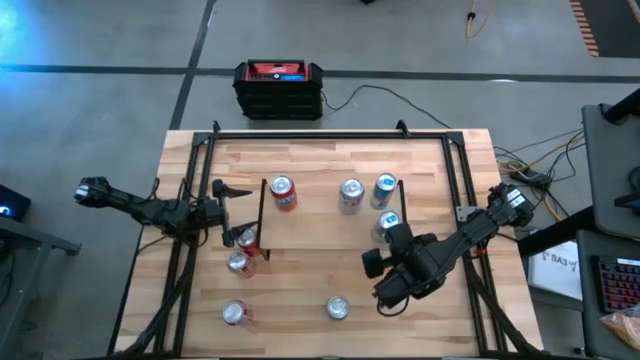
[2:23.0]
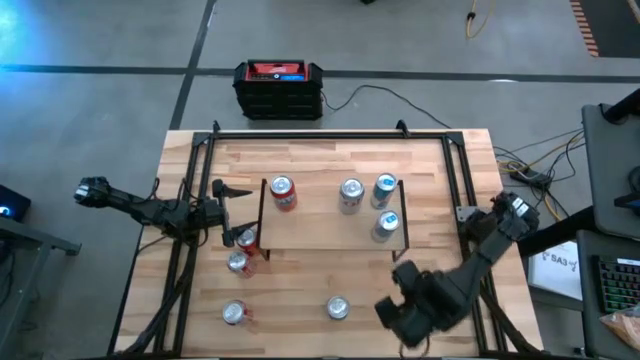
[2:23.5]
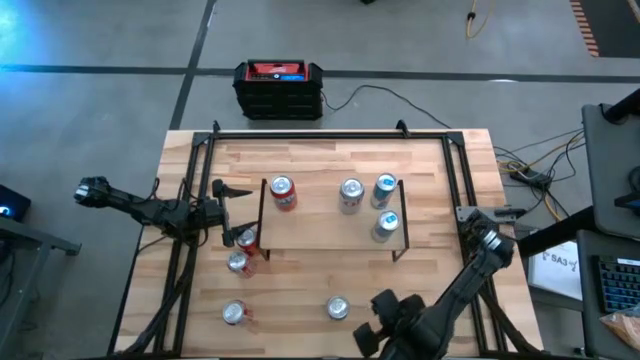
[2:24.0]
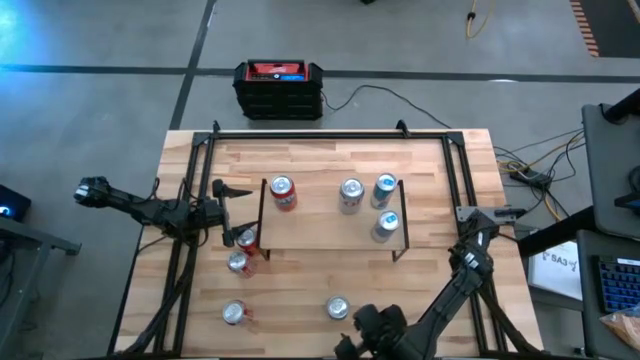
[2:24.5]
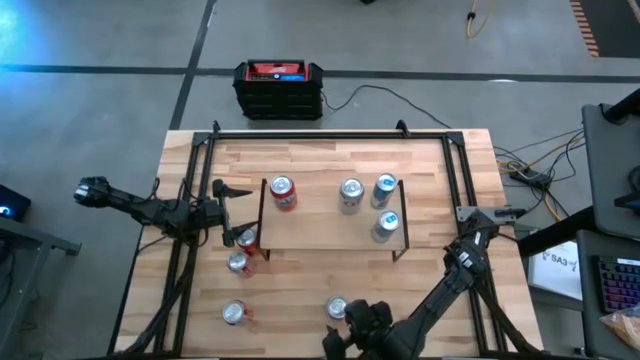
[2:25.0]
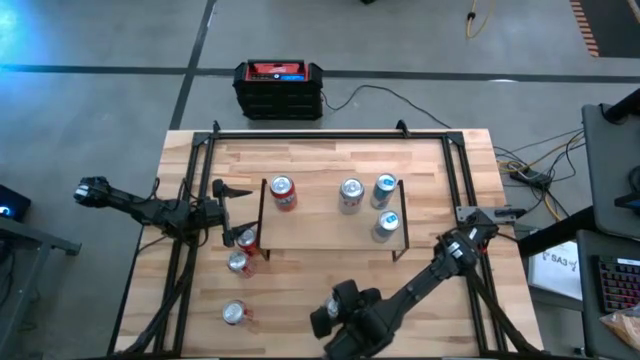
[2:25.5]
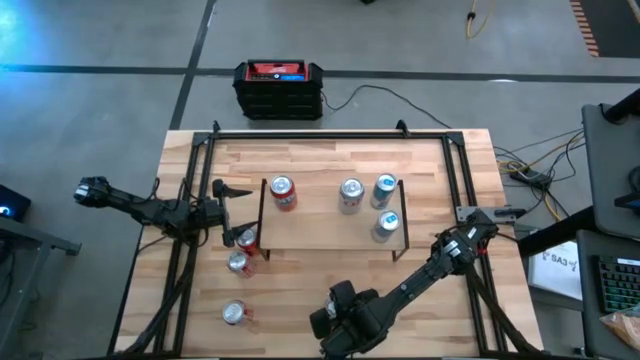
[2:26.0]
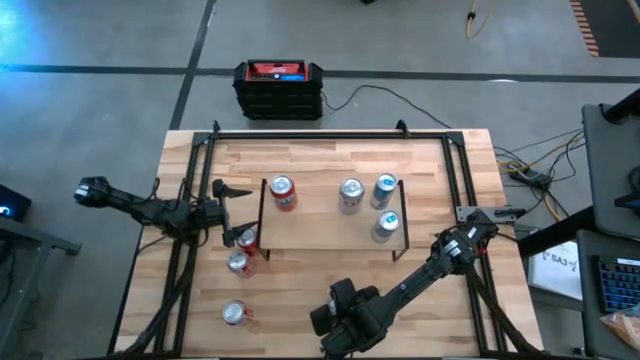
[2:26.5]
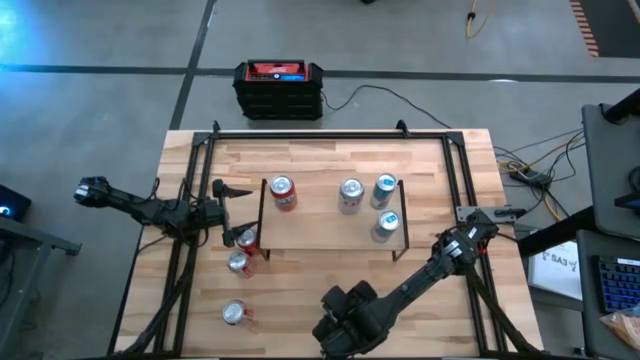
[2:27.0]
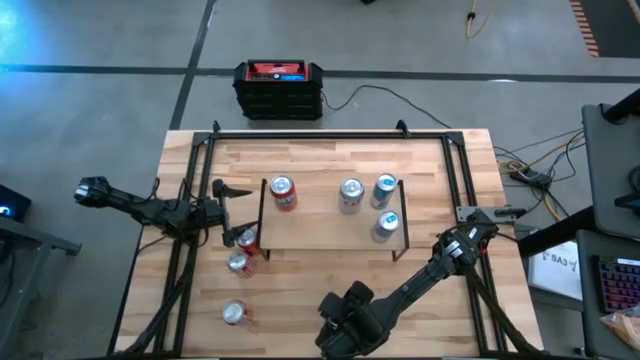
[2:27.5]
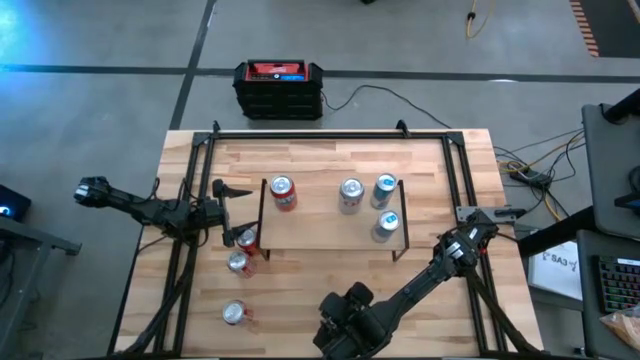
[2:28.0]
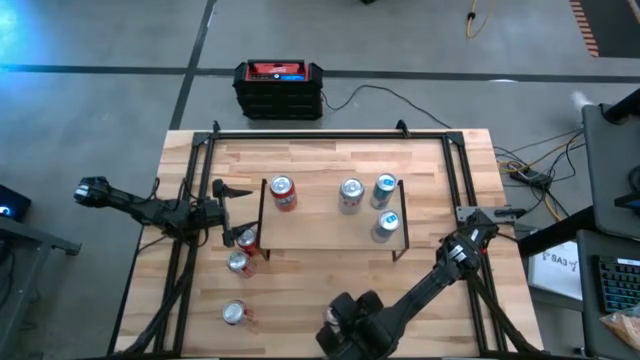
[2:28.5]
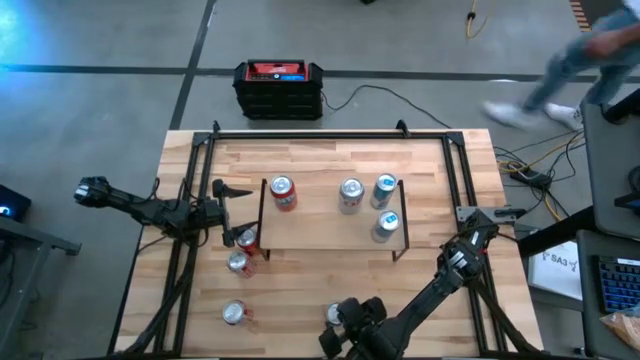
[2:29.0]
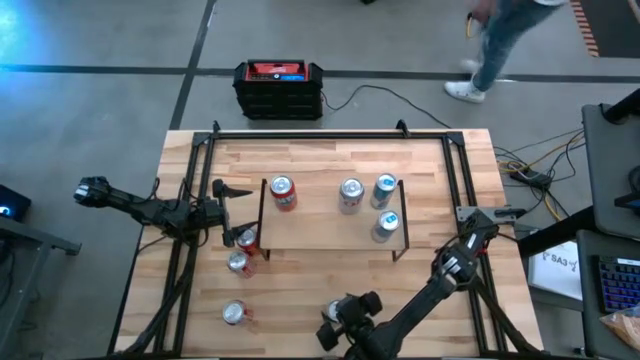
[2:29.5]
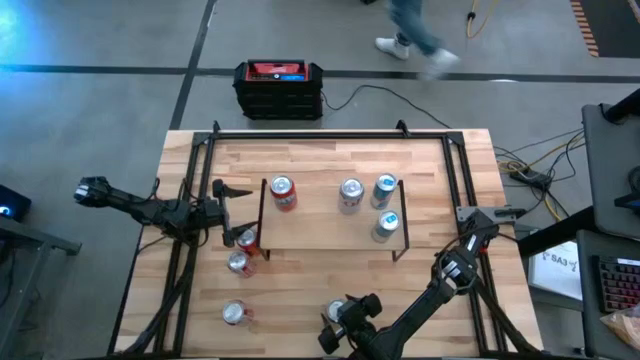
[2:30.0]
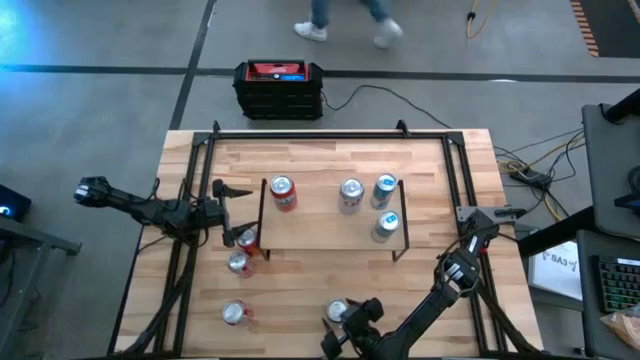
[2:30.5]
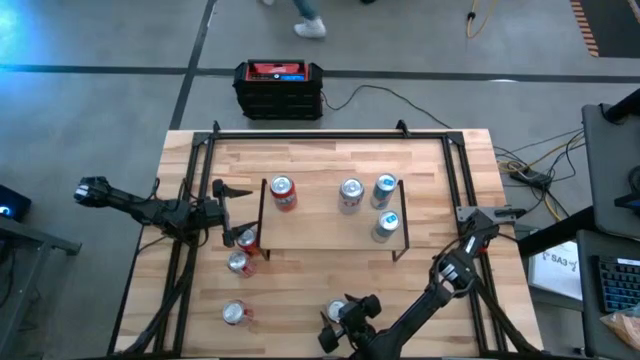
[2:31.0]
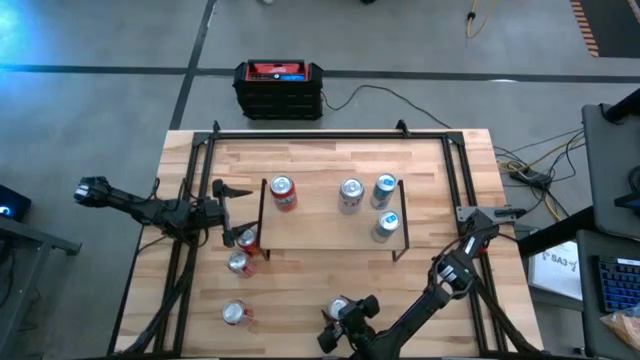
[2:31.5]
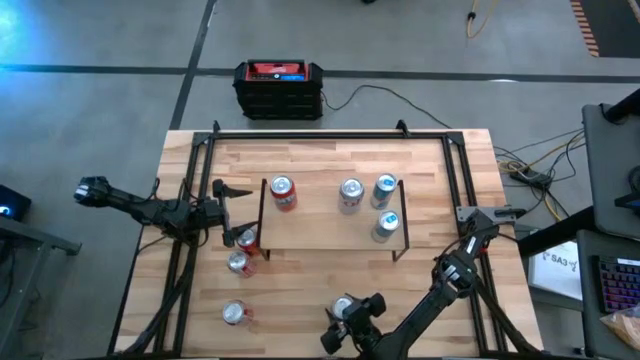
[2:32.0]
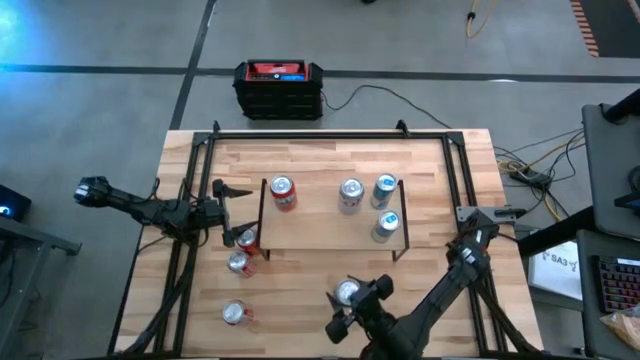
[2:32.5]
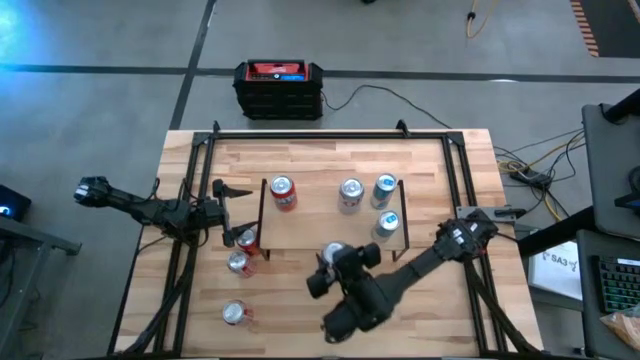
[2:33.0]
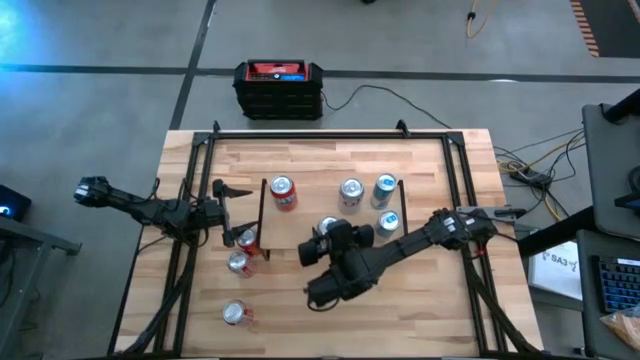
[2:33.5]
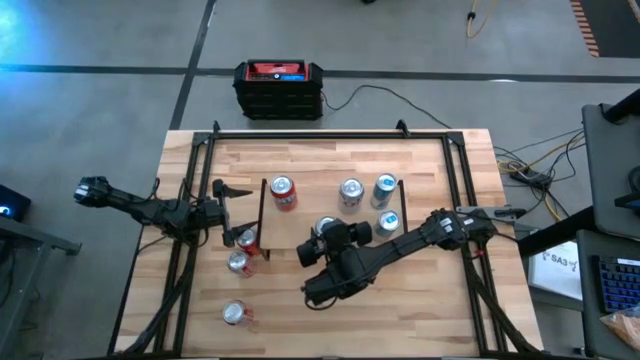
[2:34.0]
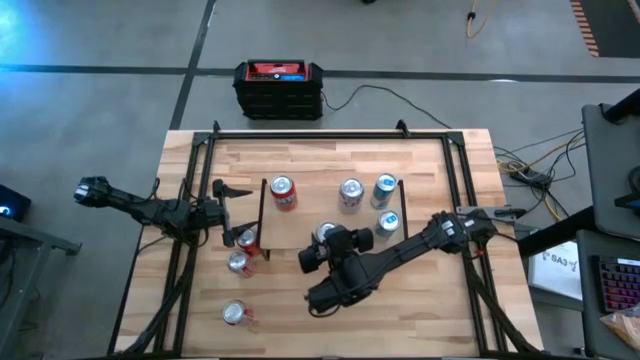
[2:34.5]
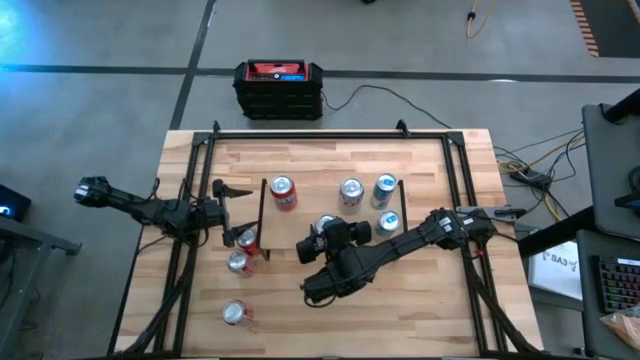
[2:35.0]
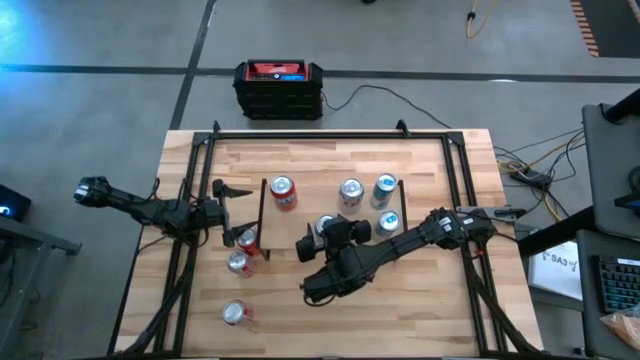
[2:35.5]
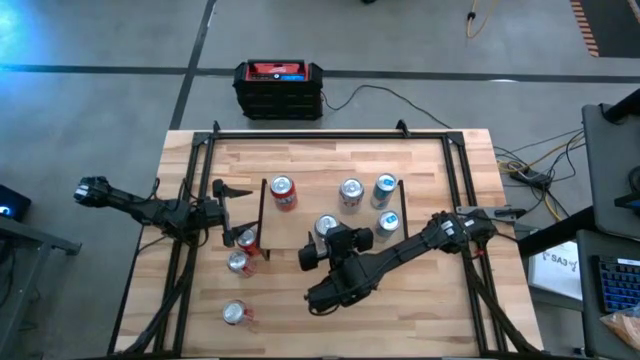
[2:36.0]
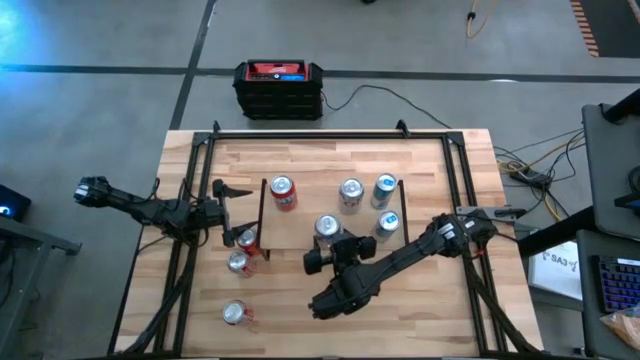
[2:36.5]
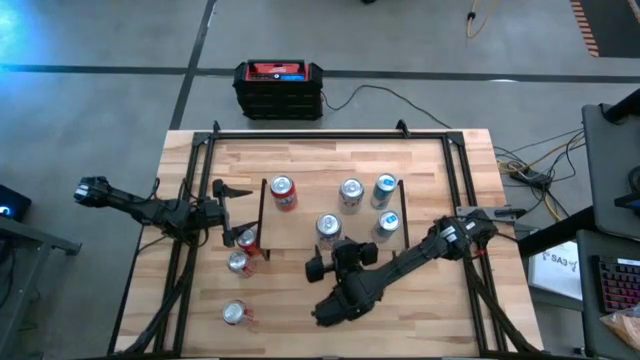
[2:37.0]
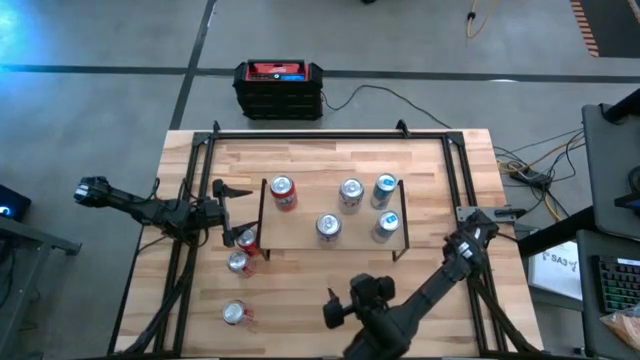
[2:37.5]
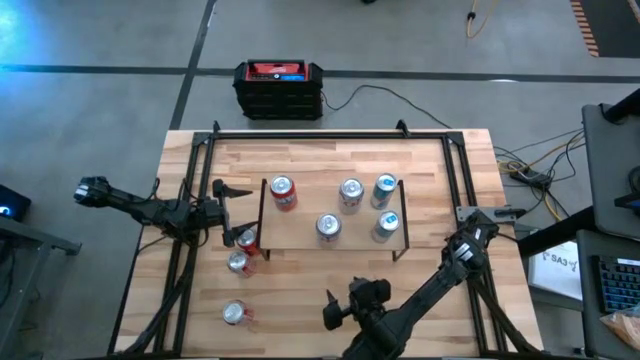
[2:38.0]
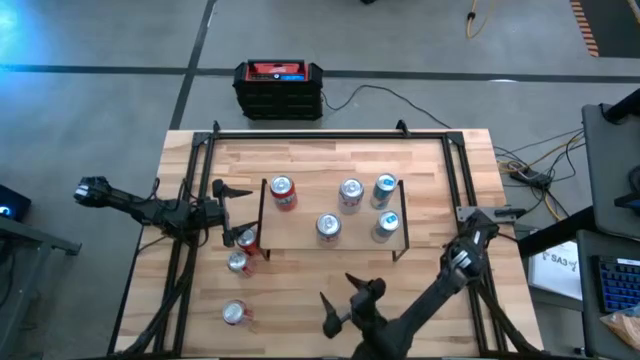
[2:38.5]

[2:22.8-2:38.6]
Task: Place canned beverage on shelf
Put the silver red soda can on the shelf aligned with the other silver red soda can

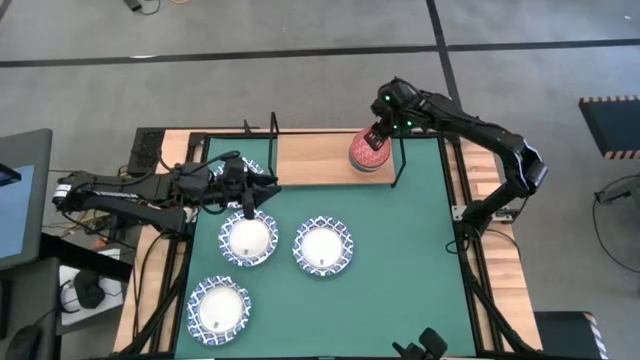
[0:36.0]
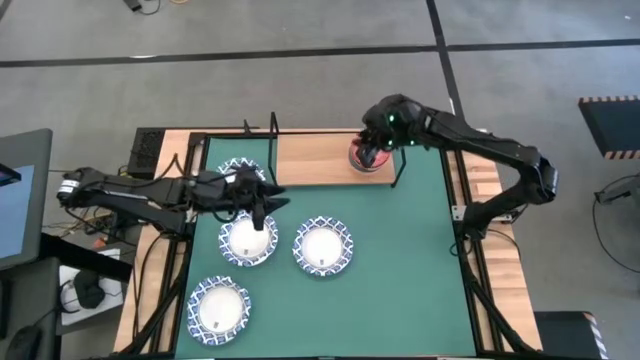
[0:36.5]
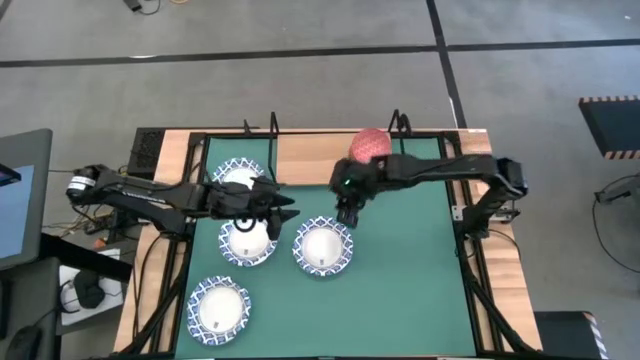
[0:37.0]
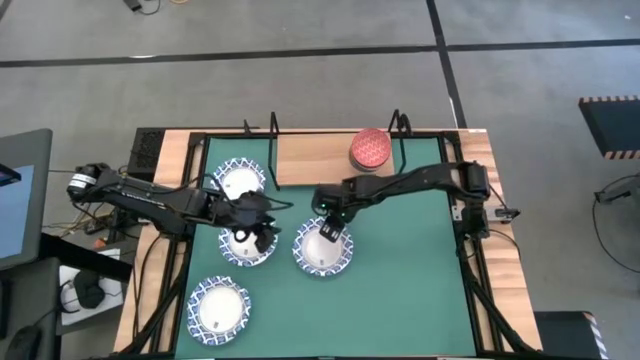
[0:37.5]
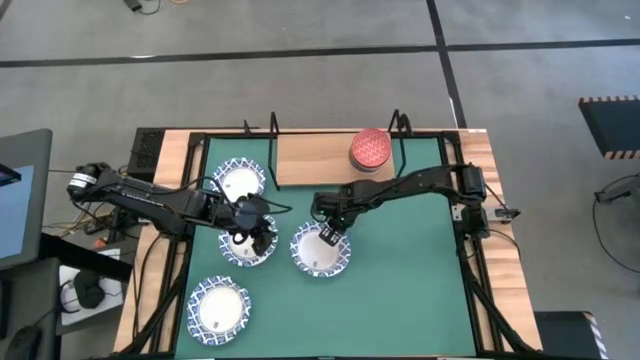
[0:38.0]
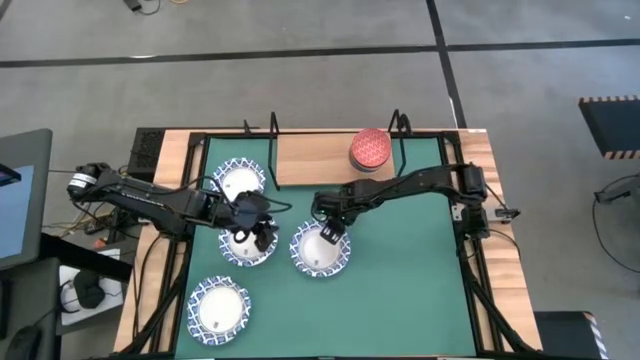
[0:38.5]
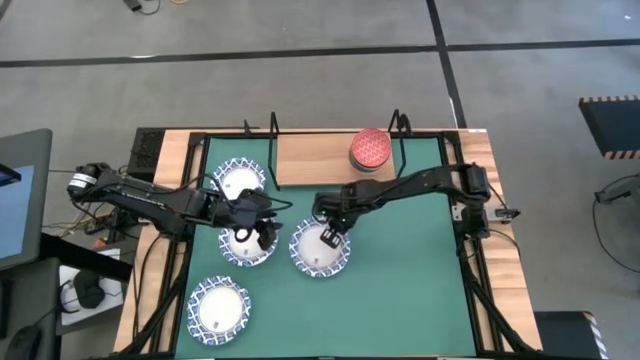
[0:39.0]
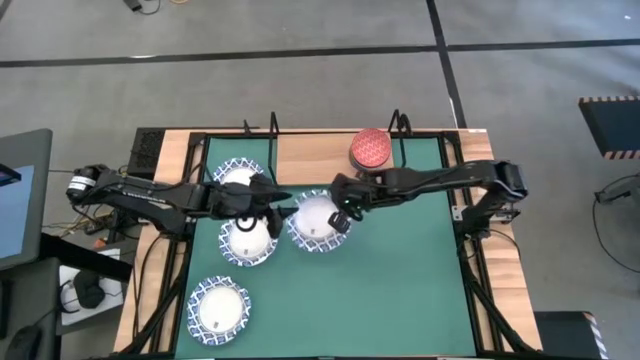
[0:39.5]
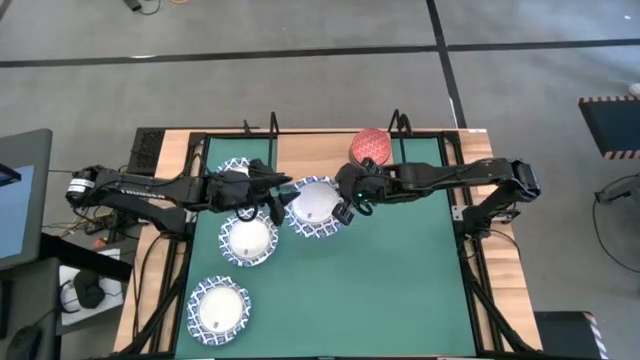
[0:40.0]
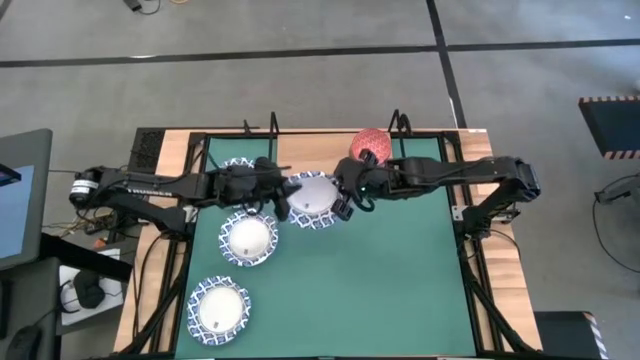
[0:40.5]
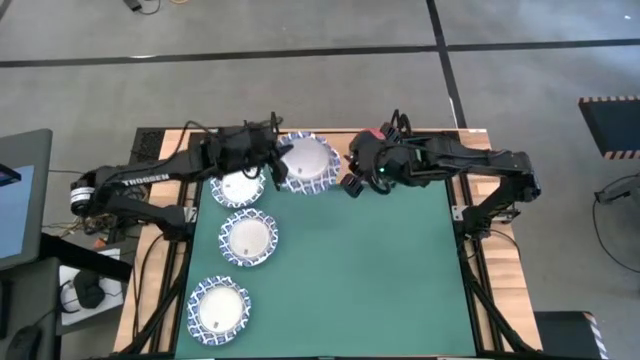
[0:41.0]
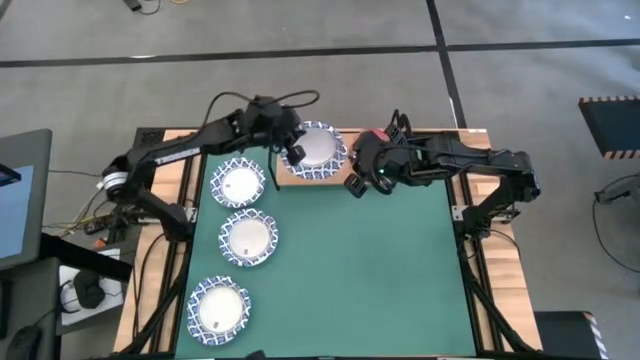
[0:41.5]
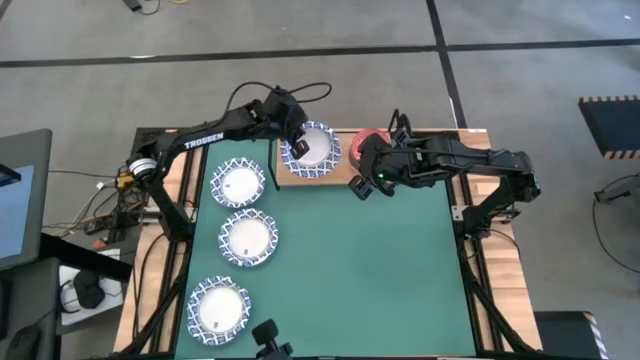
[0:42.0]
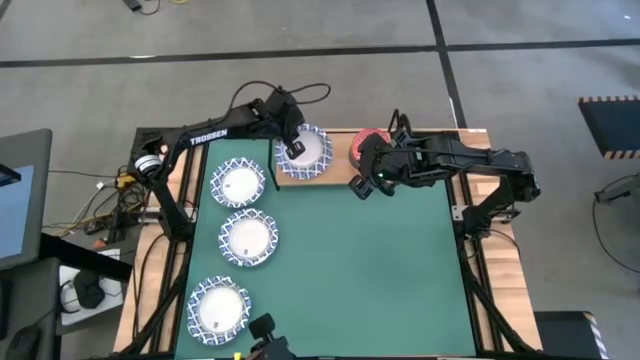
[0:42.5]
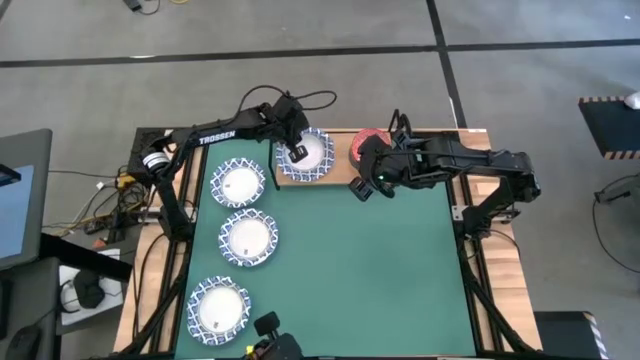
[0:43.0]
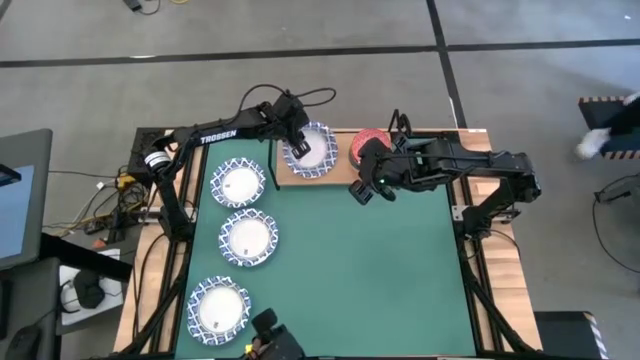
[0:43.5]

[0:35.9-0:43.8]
Task: Place and stack bowls onto a shelf
Put the right white-blue paper bowl on the shelf
